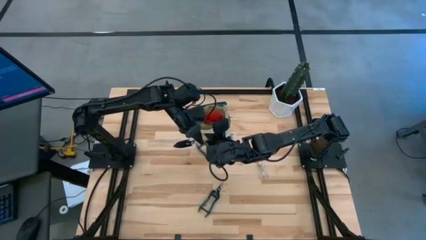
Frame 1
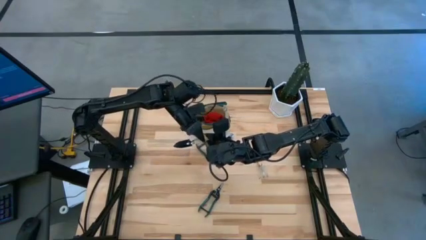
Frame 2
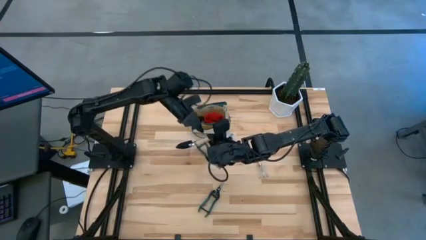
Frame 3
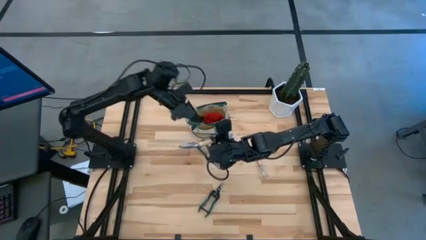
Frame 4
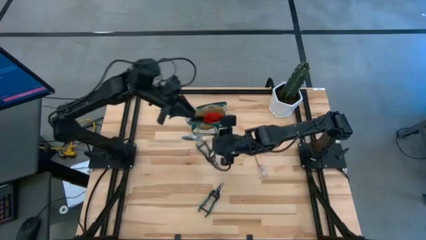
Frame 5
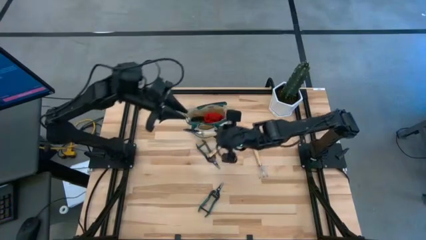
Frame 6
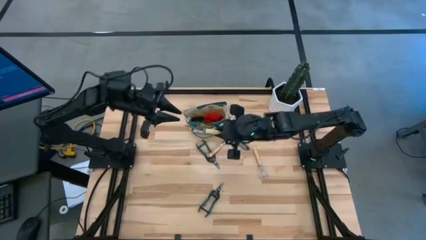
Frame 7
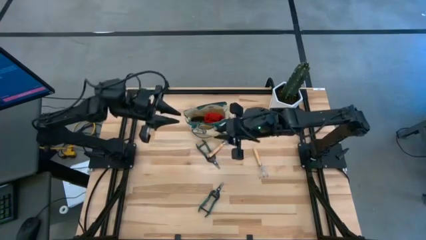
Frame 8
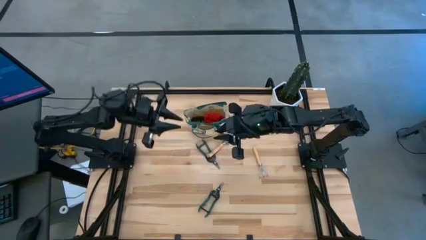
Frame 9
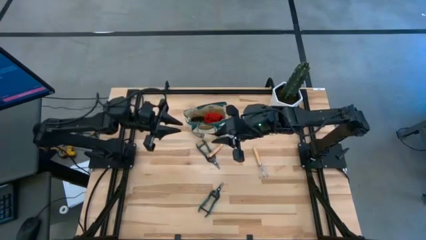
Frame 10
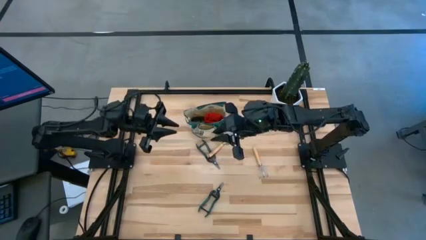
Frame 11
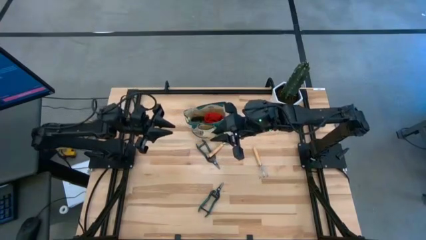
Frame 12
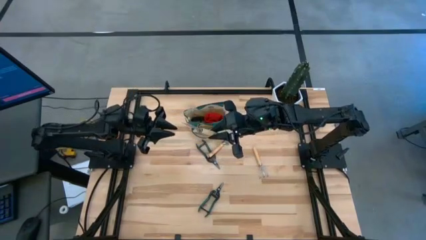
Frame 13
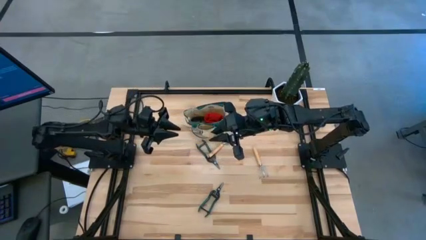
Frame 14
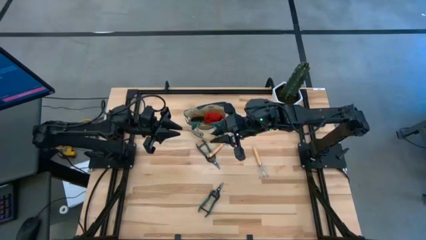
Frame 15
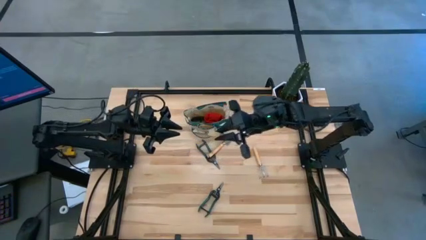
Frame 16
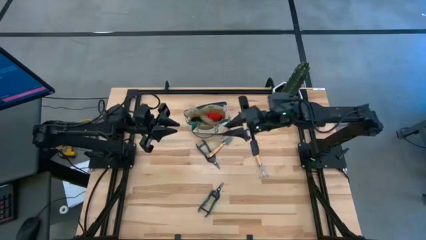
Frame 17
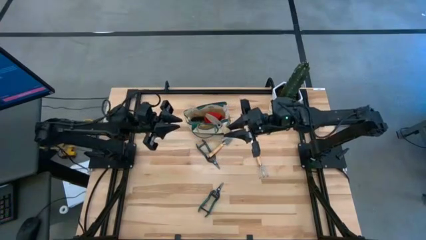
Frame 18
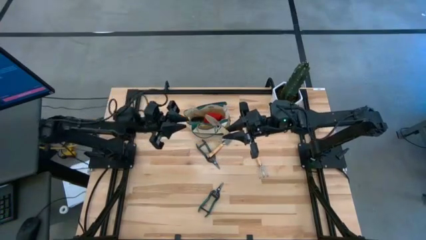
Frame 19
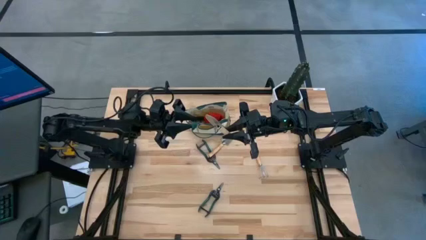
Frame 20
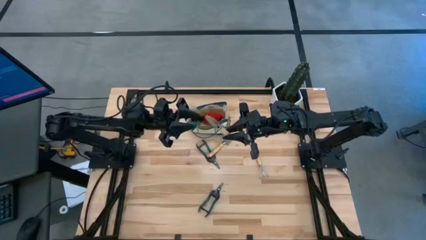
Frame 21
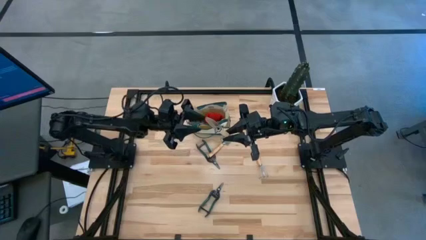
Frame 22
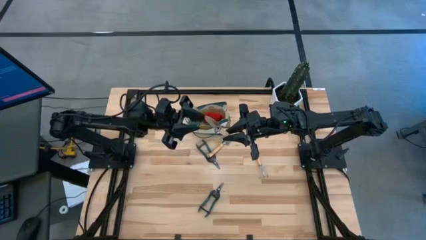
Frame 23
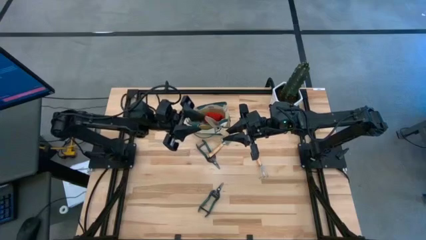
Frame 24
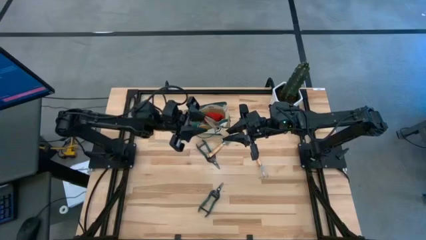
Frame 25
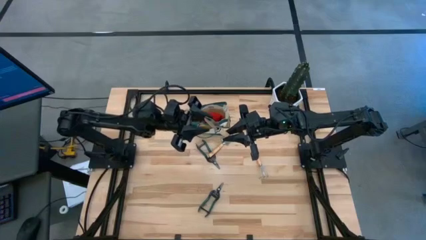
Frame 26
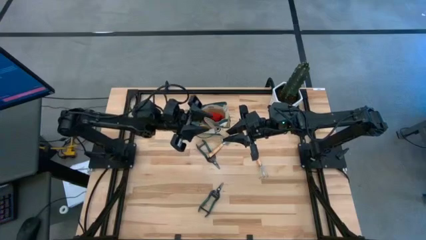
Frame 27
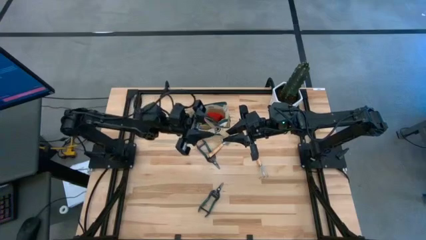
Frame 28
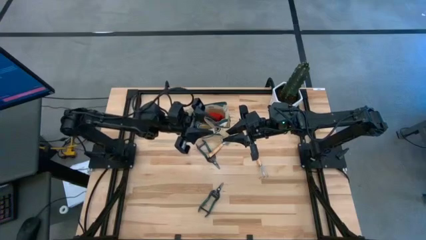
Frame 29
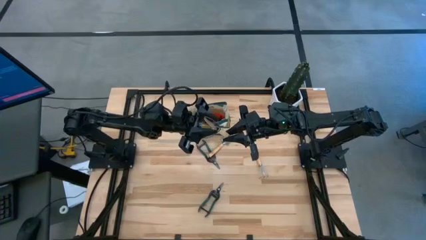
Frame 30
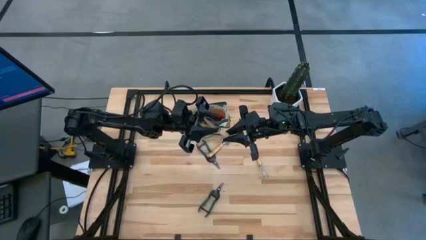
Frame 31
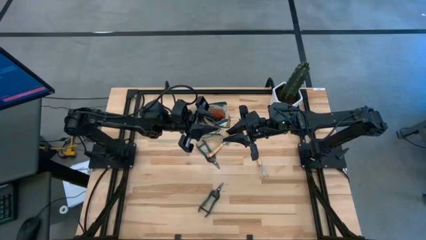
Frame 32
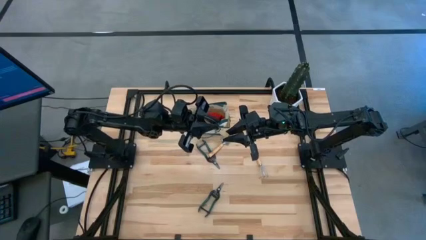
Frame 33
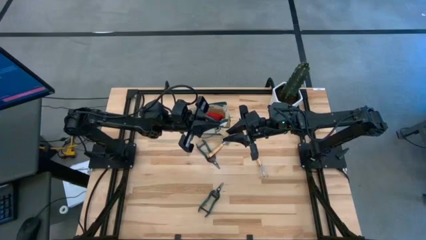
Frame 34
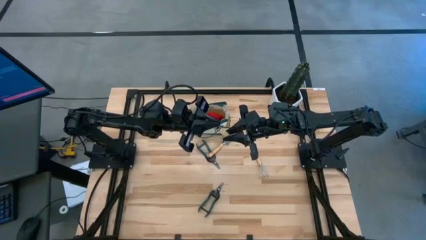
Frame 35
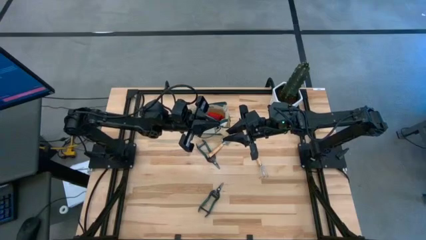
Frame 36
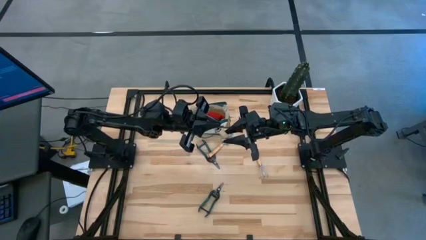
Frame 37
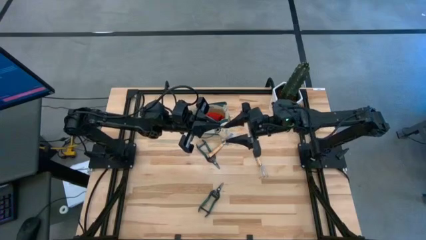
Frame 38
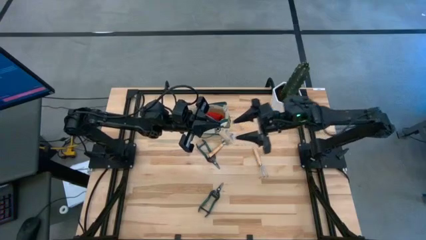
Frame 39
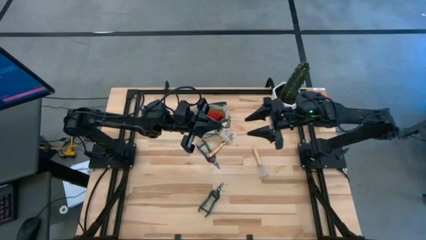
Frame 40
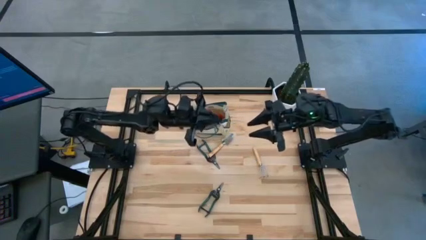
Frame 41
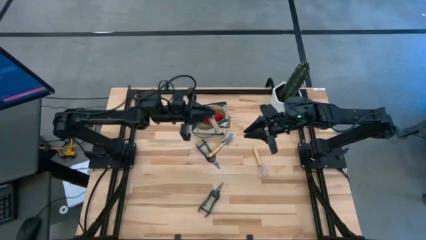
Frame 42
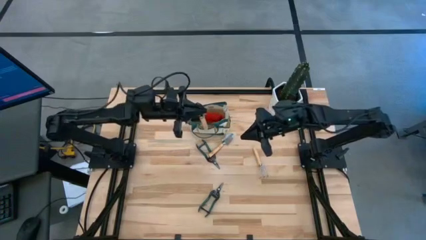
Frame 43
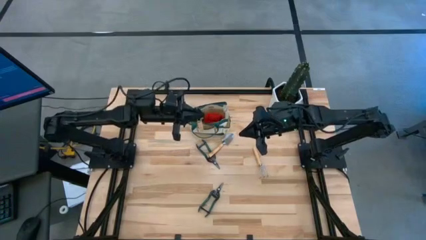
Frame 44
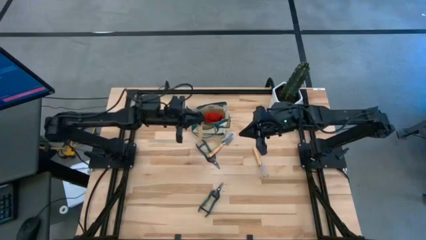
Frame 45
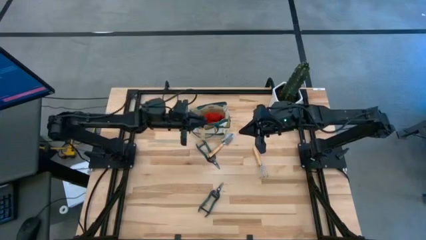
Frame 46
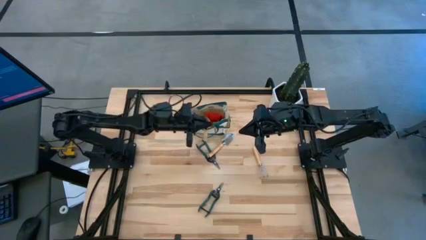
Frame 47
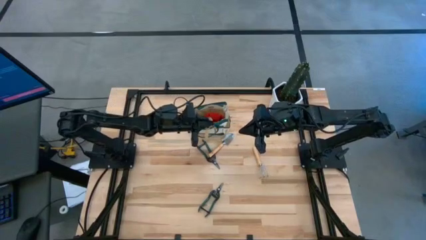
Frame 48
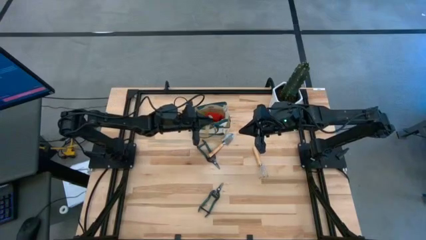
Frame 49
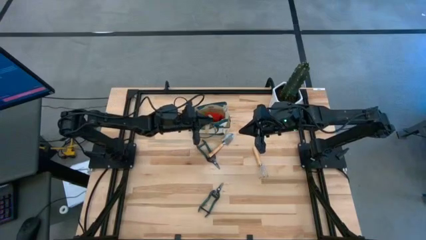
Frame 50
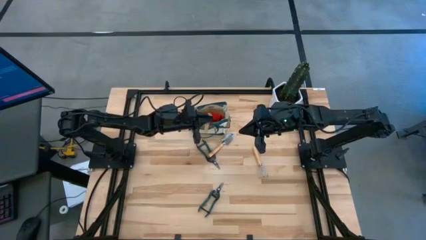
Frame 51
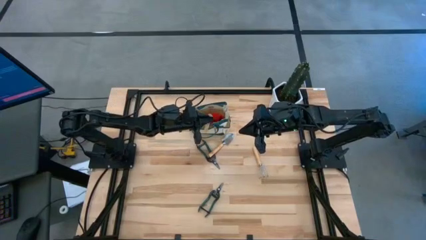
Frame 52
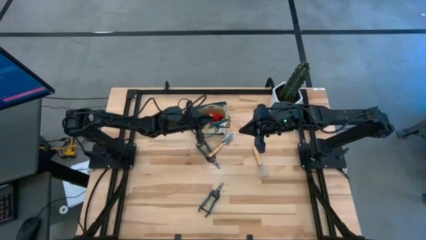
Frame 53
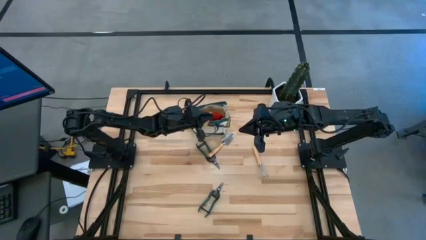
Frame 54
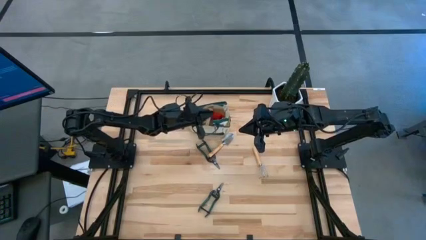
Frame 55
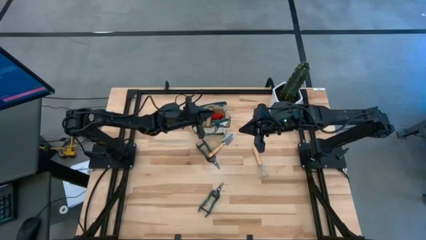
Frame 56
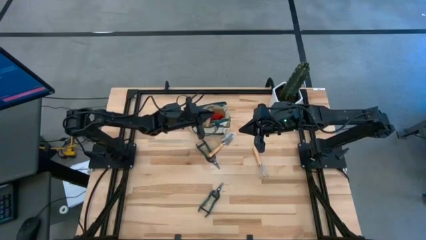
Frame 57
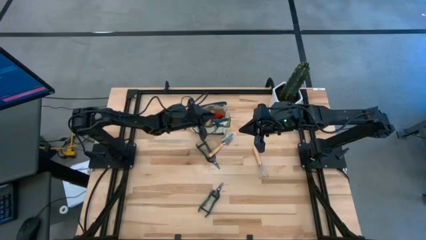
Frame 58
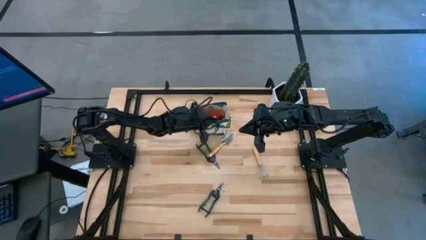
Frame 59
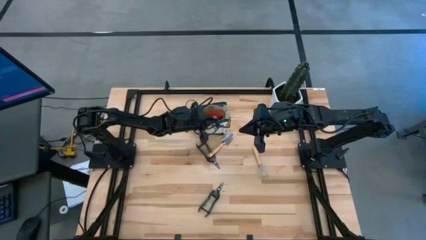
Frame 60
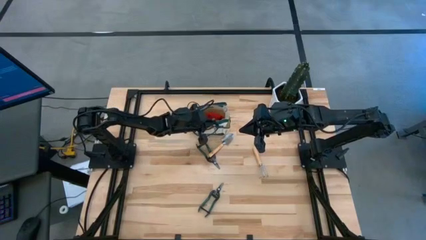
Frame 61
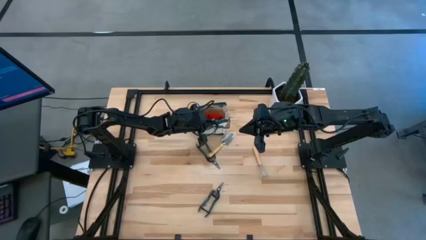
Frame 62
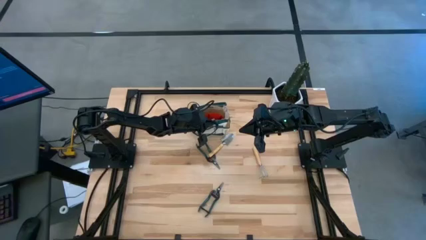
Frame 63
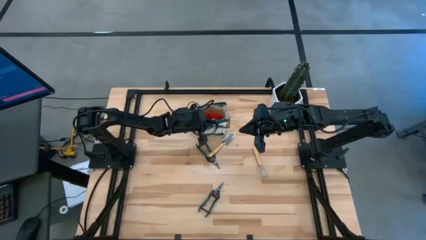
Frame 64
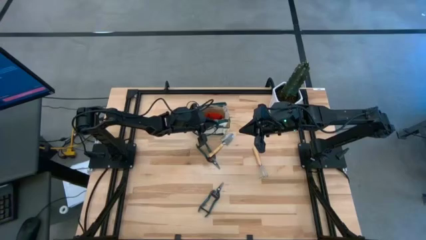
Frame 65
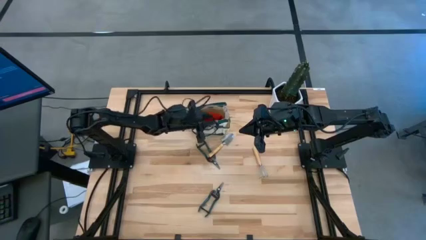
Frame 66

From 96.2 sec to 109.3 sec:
Task: Pick & Place Garden tools in Gardening bag
Put the bottom brown trowel into the brown gardening bag
